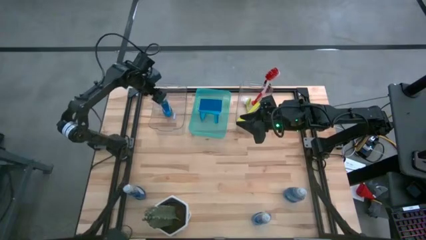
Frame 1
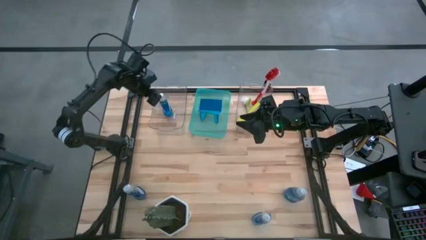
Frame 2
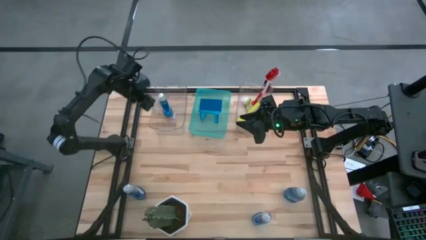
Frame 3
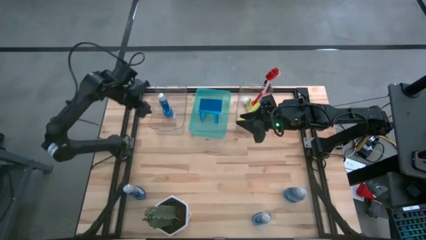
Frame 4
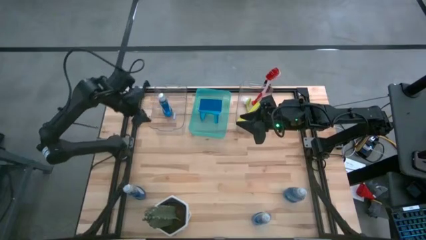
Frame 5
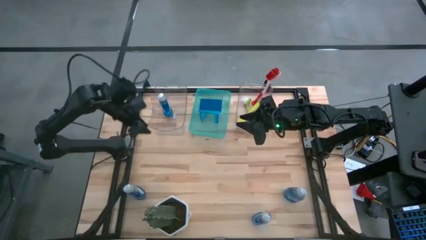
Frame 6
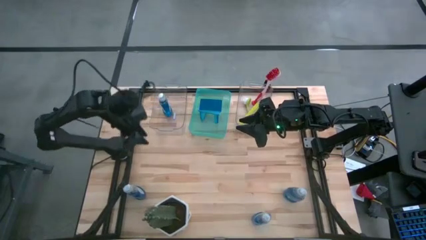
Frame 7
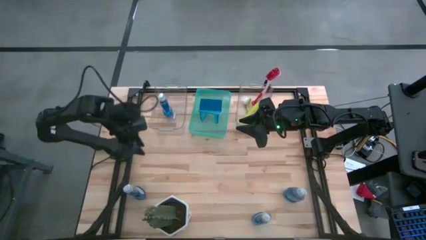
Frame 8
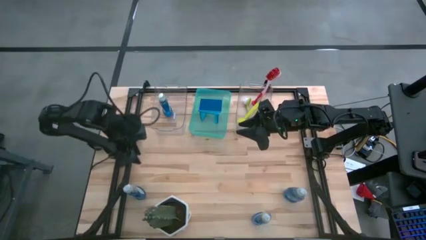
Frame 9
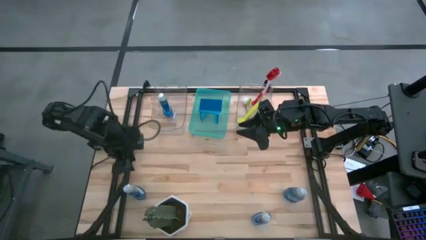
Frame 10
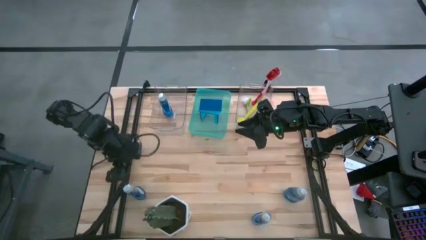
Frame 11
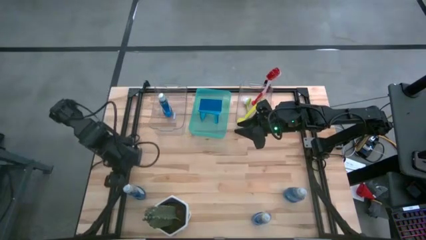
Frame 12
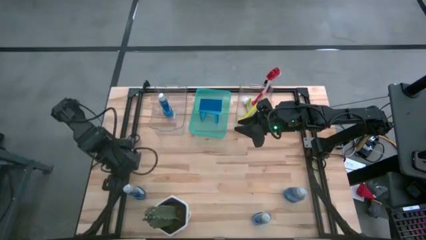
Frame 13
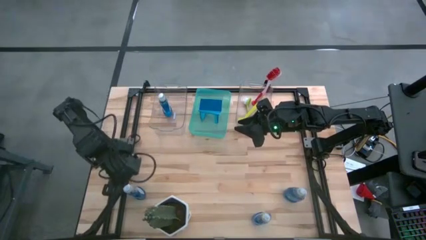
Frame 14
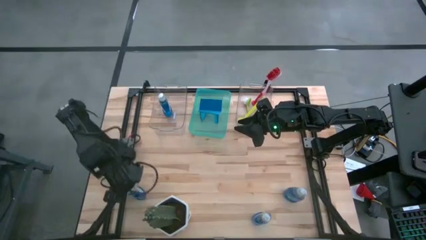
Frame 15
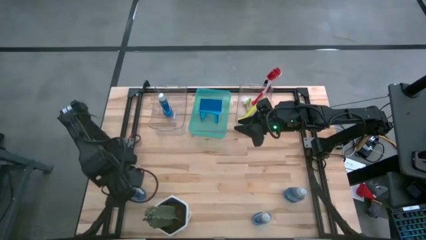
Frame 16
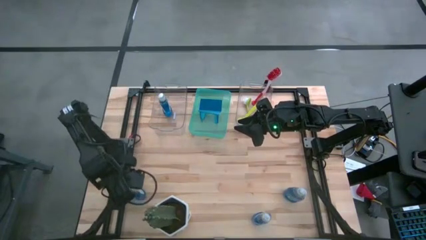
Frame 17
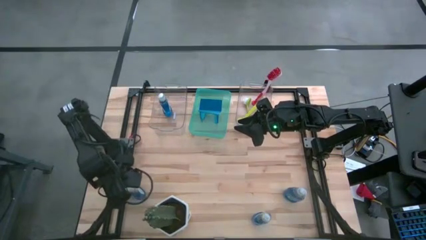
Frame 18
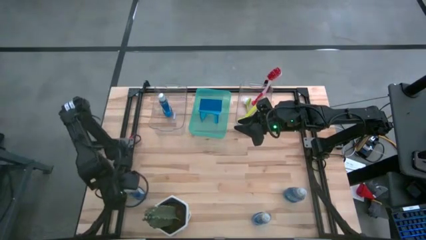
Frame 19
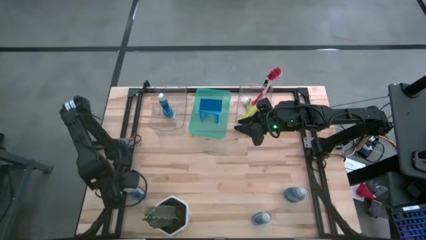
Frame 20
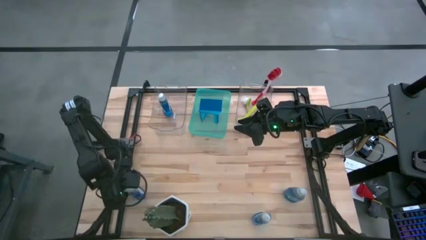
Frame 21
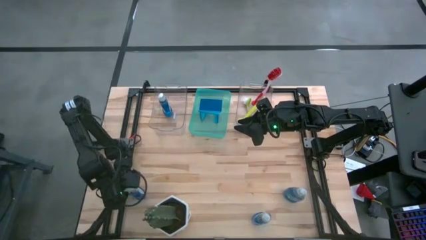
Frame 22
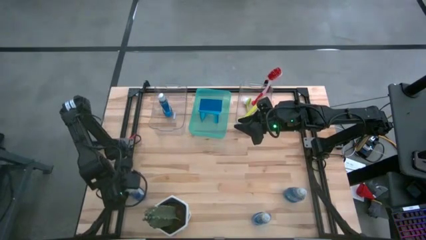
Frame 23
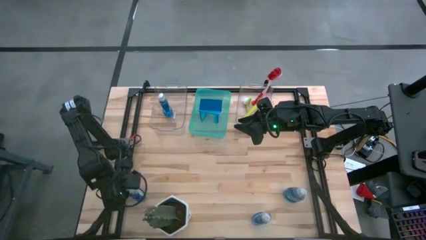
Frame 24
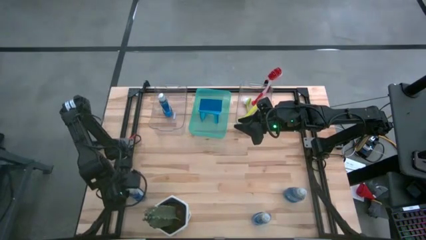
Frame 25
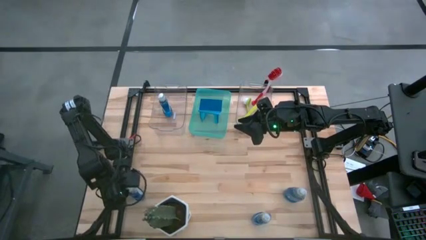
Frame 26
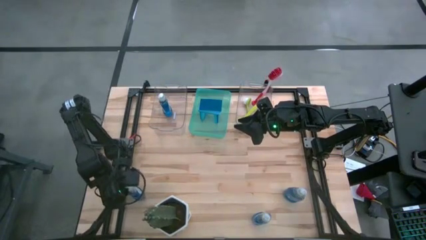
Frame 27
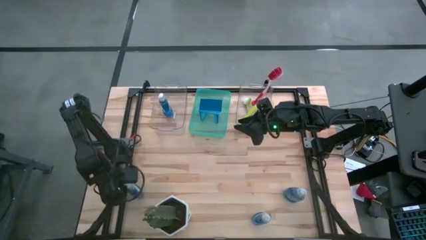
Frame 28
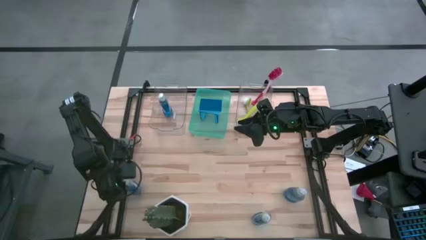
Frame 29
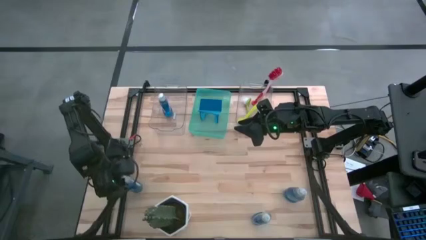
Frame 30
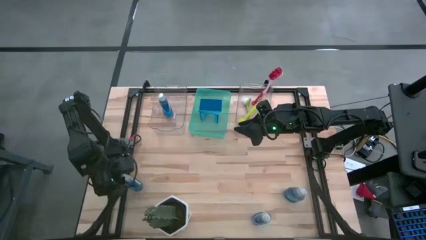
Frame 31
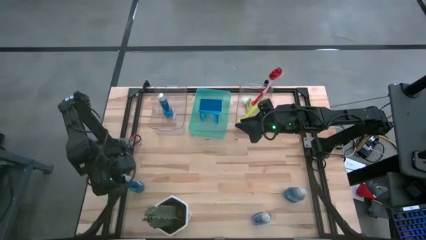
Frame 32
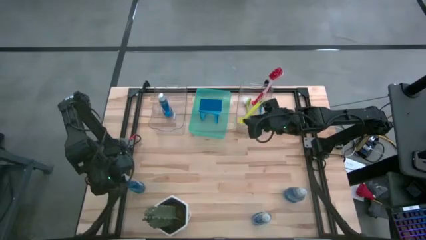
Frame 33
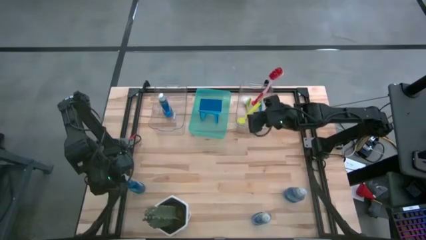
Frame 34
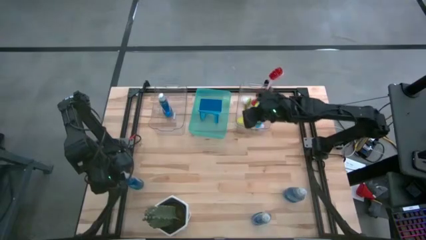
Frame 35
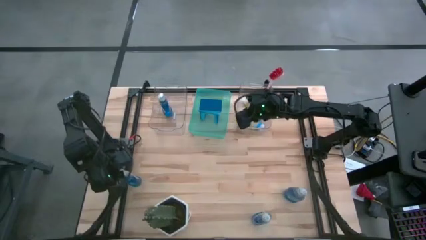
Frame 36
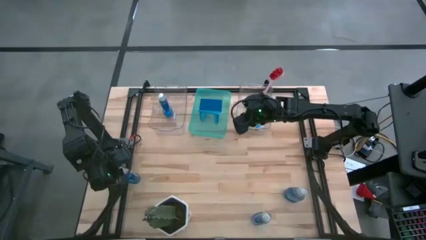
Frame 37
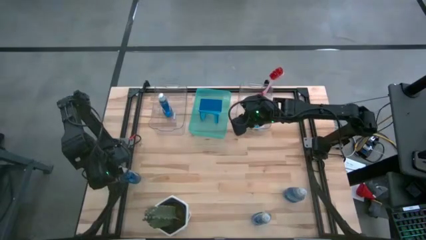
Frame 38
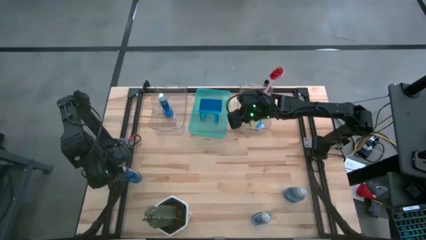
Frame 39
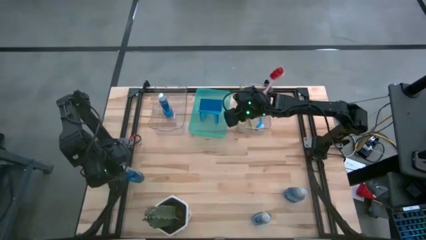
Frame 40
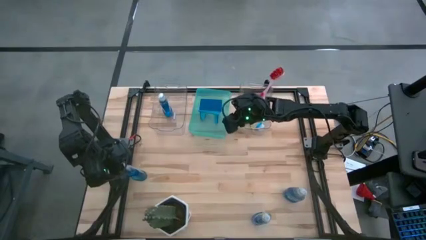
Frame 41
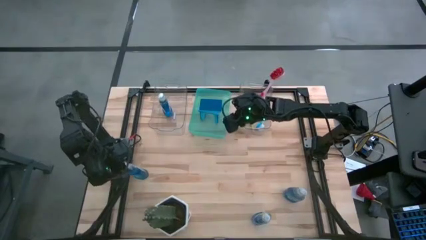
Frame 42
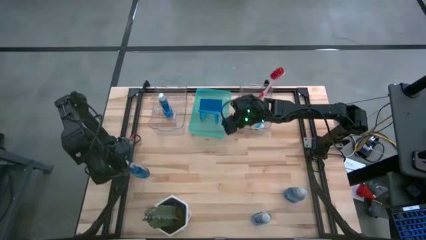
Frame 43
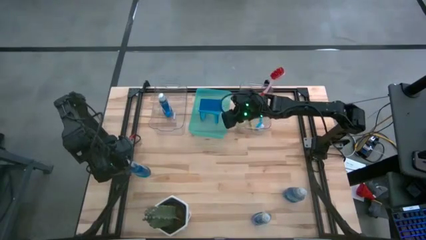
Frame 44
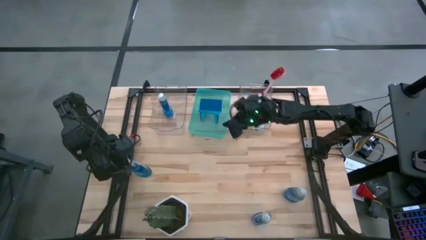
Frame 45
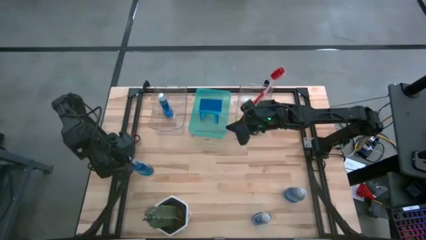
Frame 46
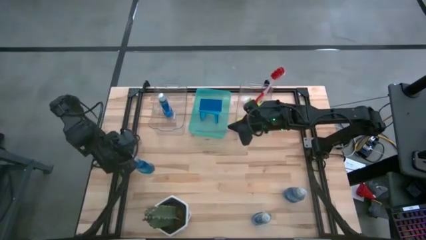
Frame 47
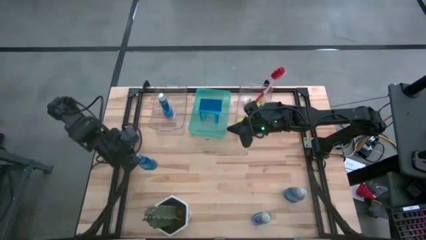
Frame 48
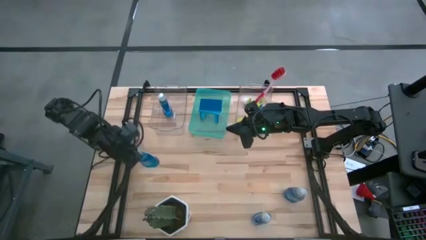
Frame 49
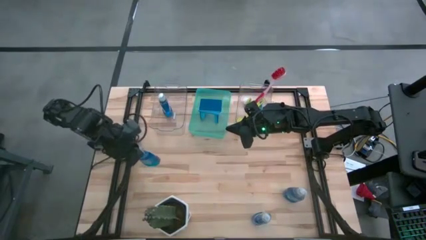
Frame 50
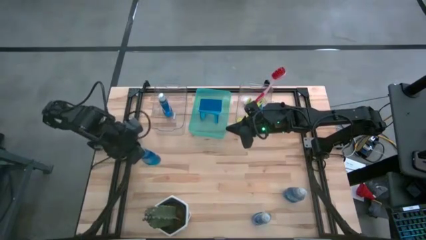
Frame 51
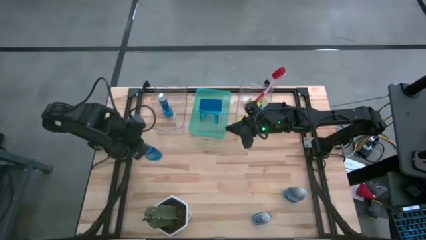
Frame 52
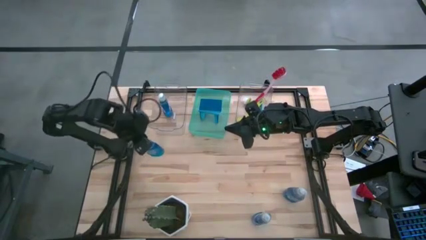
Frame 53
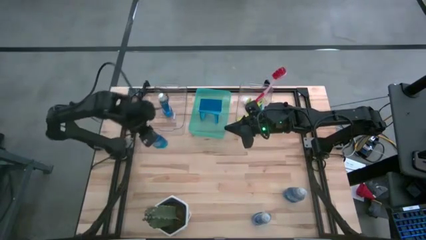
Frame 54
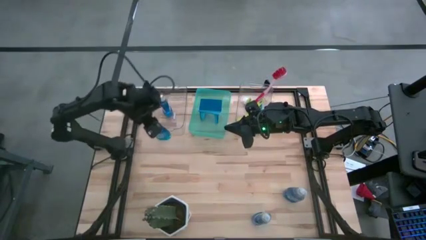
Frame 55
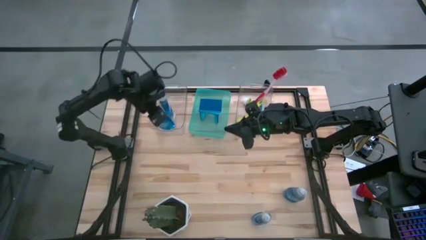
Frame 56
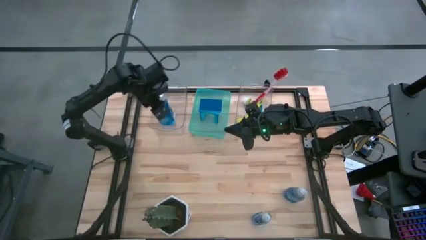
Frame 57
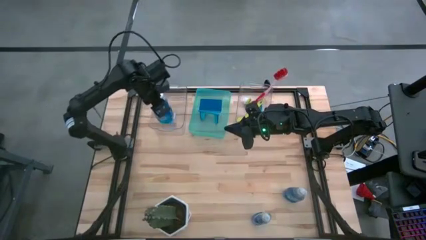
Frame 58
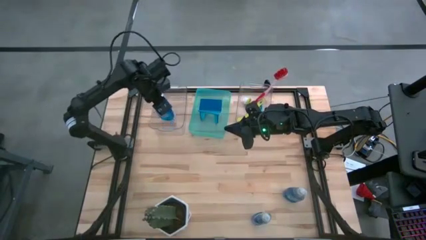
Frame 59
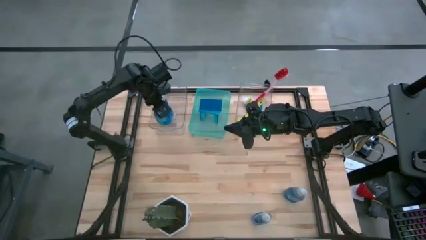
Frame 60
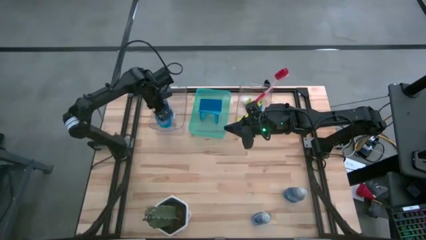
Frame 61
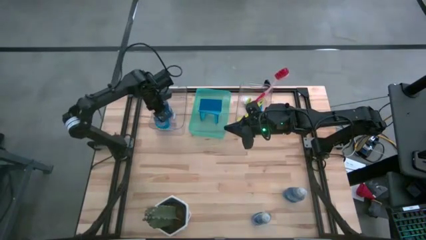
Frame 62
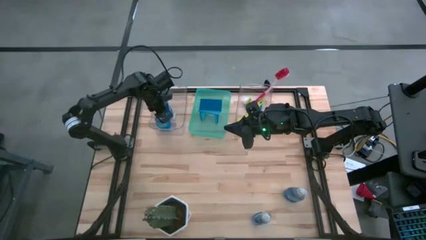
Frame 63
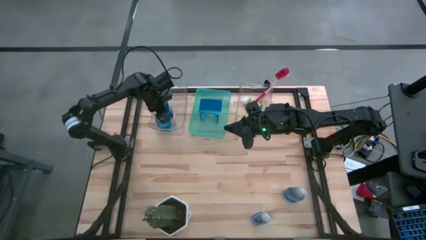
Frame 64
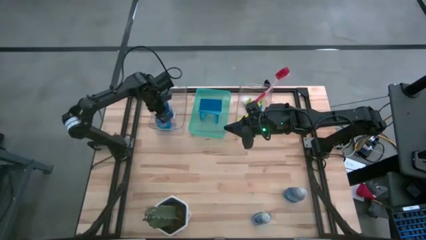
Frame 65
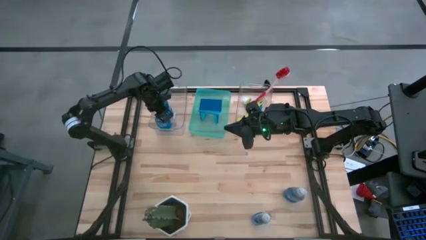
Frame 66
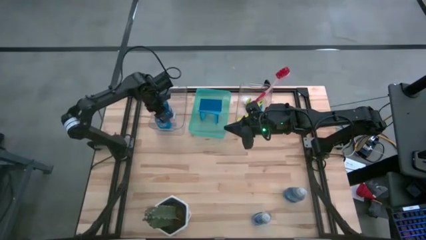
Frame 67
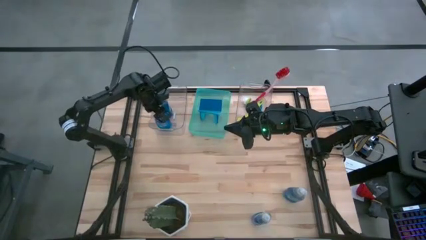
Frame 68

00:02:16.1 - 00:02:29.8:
Task: Pick & Place Kitchen Sink Supplies
Put the dishwashing liquid into the left transparent bin

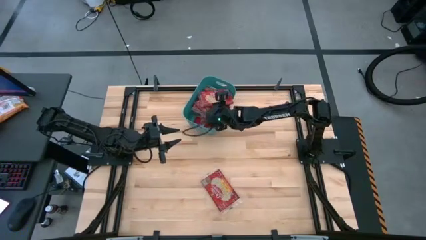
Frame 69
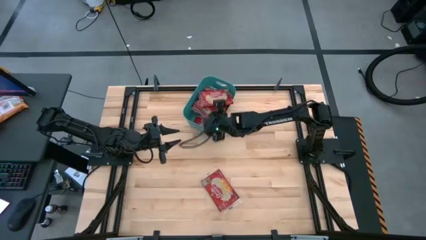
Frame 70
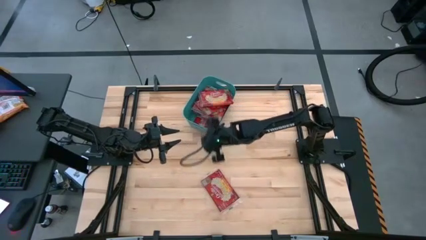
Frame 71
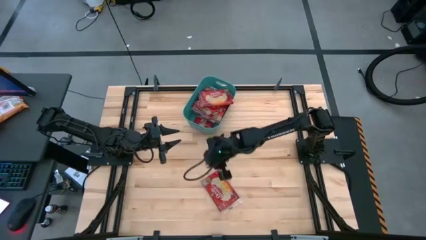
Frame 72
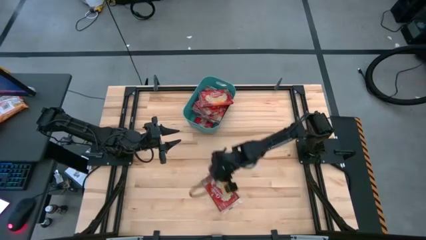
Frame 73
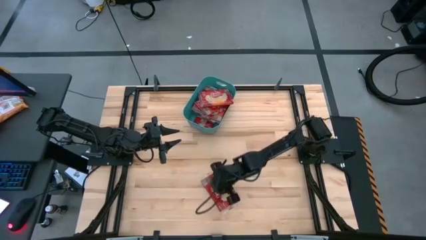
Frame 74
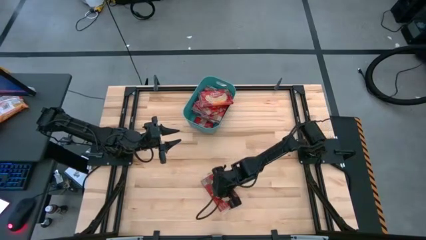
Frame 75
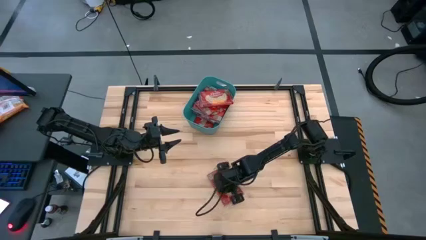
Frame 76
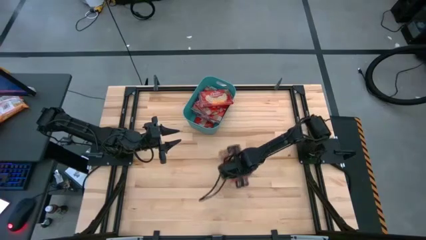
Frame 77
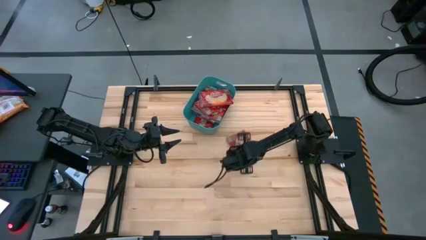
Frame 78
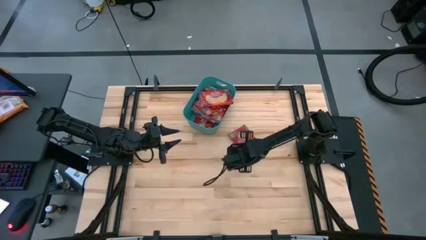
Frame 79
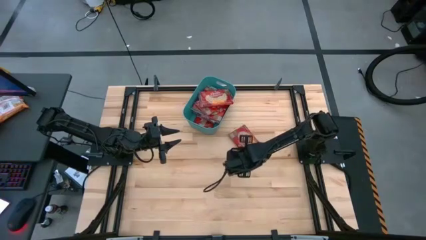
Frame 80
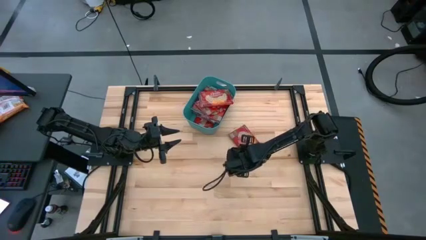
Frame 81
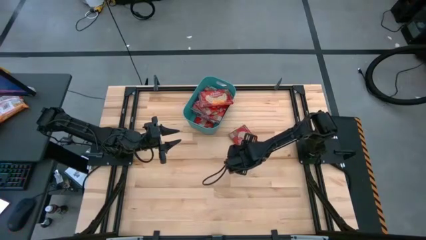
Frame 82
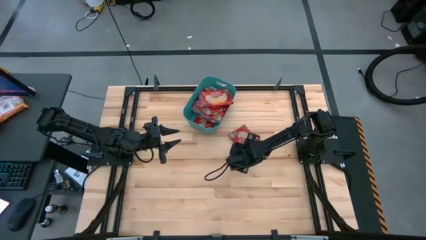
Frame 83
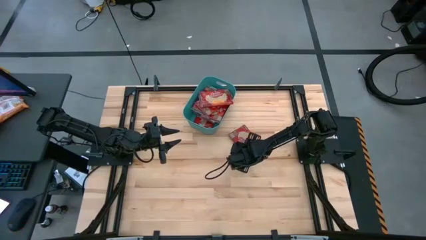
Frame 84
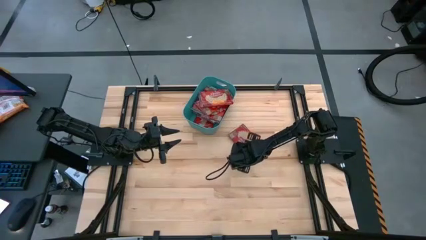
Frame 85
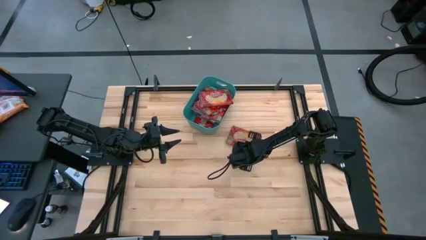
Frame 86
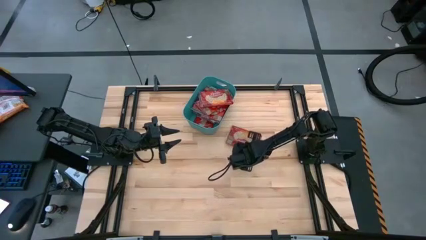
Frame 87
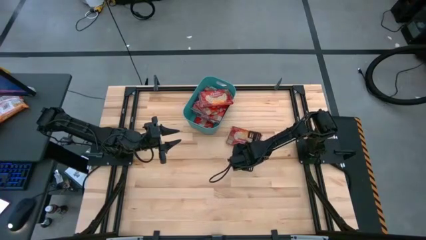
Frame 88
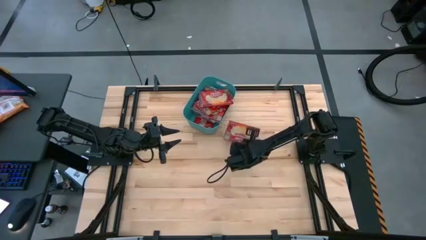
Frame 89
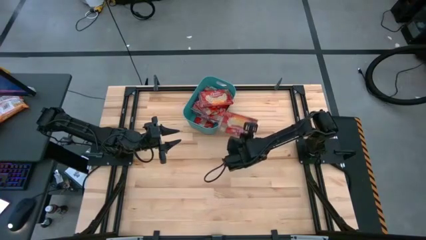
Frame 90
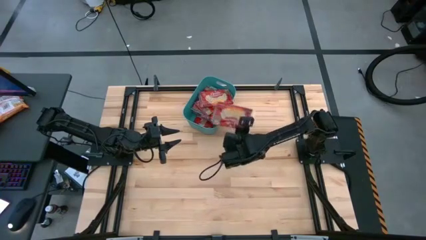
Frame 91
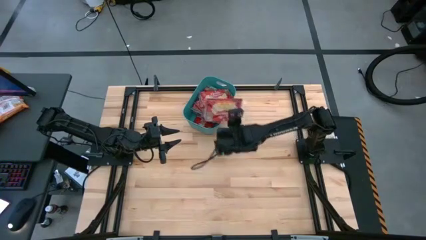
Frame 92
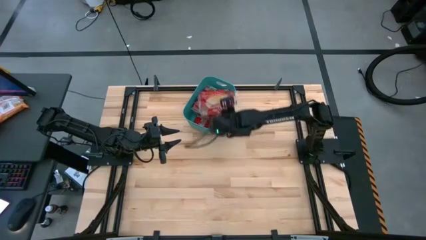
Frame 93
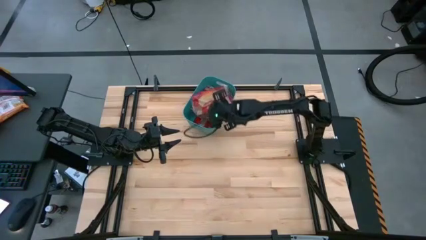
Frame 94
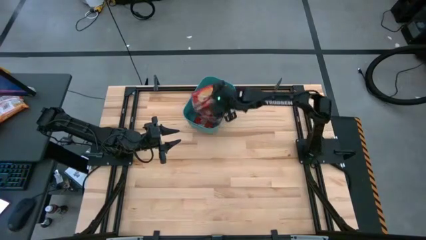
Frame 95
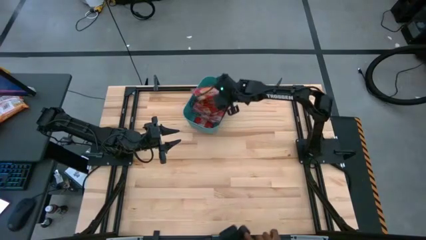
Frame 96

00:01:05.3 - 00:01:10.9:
Task: Sort popcorn bags into baskets
Put the popcorn bag into the green bin
